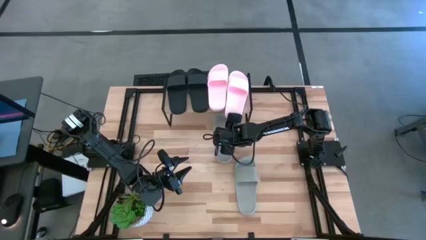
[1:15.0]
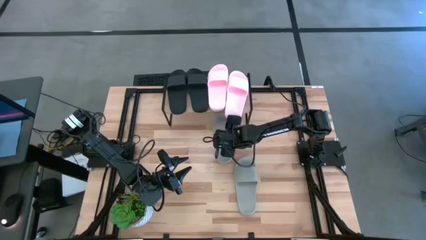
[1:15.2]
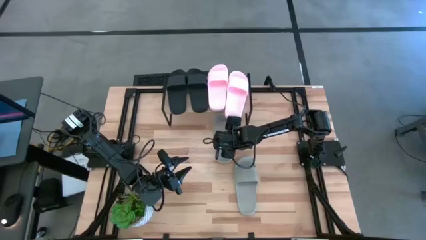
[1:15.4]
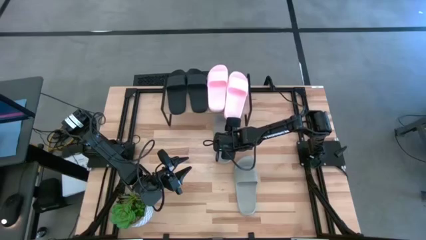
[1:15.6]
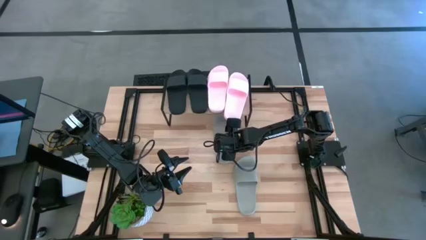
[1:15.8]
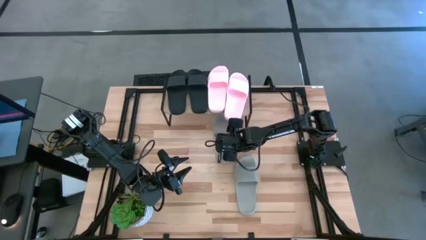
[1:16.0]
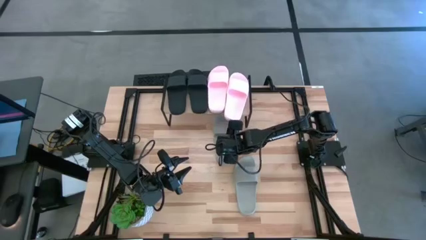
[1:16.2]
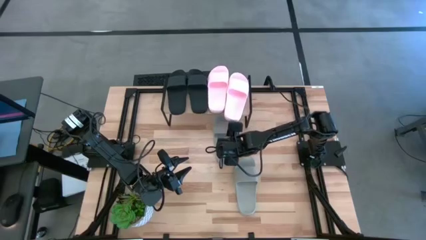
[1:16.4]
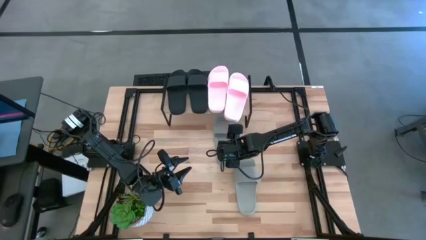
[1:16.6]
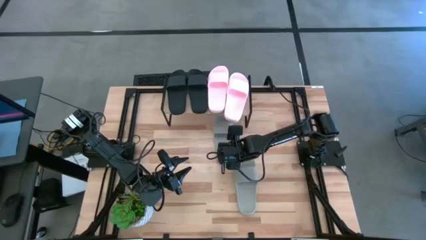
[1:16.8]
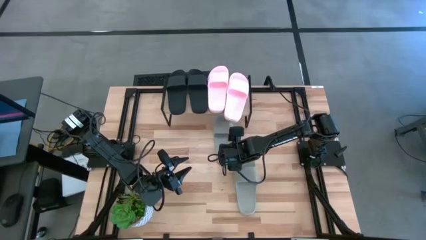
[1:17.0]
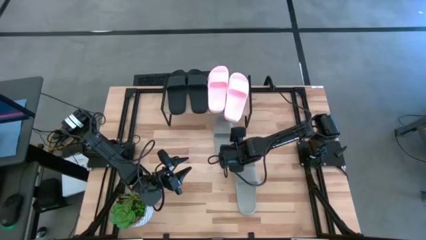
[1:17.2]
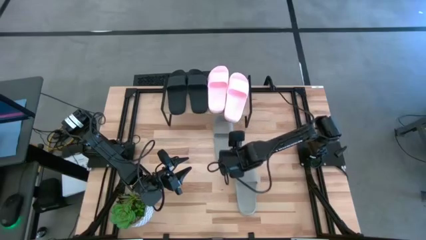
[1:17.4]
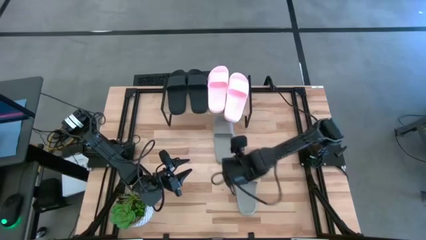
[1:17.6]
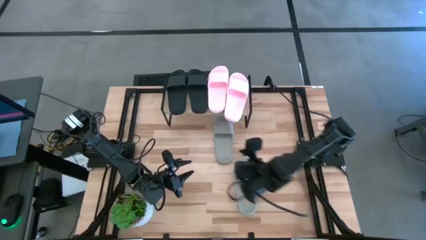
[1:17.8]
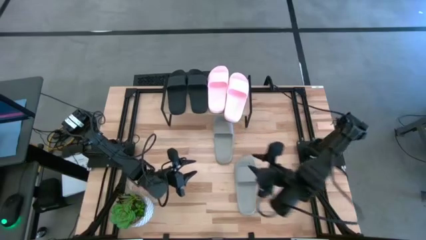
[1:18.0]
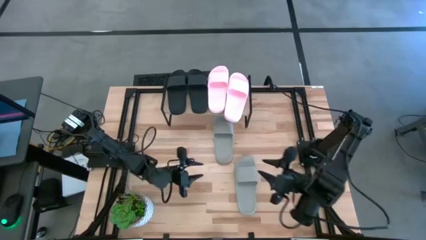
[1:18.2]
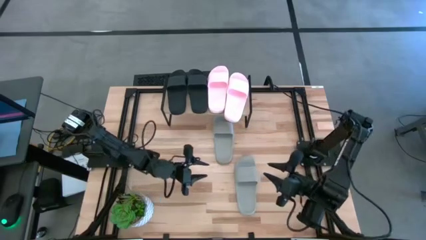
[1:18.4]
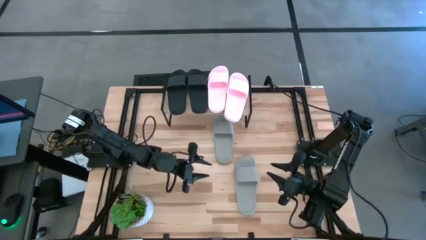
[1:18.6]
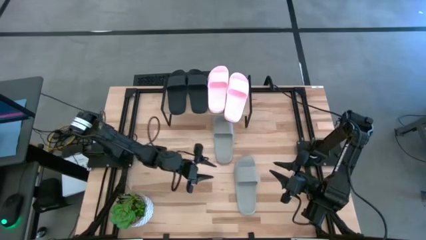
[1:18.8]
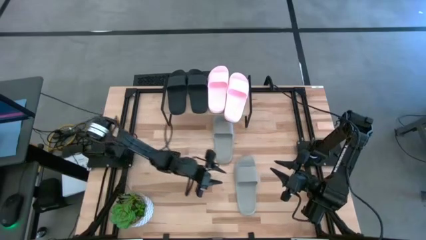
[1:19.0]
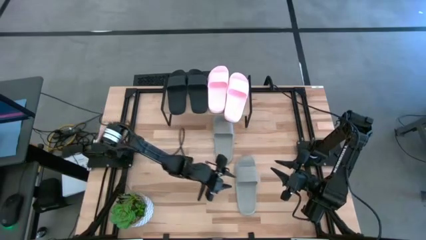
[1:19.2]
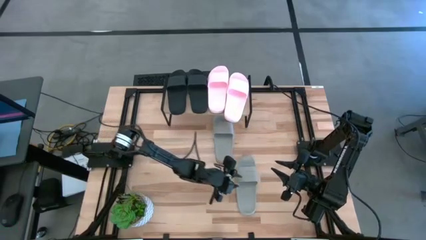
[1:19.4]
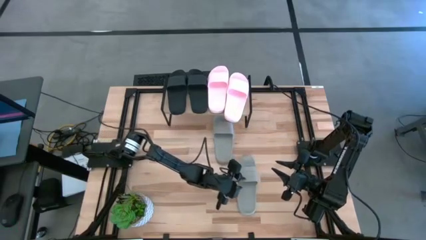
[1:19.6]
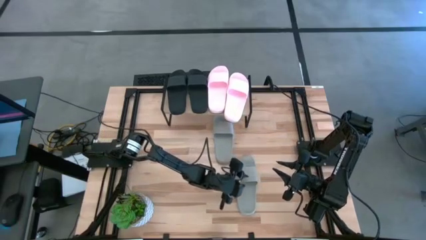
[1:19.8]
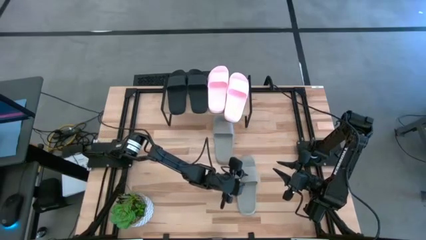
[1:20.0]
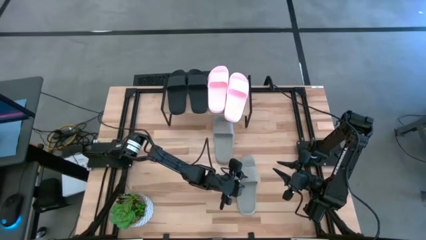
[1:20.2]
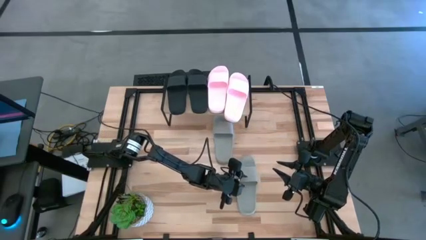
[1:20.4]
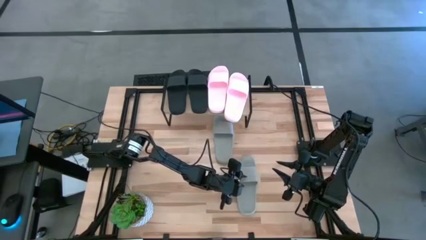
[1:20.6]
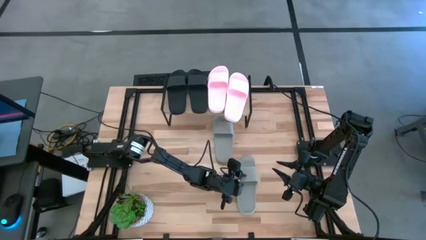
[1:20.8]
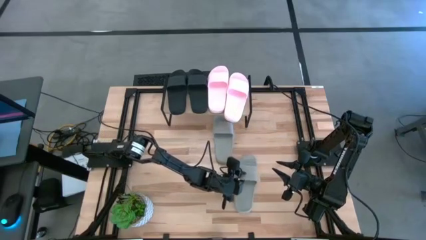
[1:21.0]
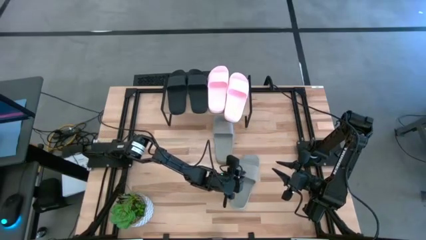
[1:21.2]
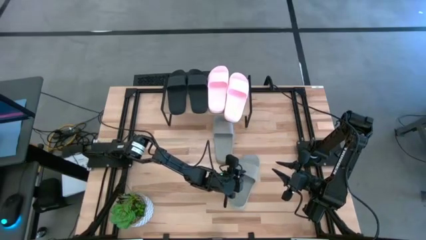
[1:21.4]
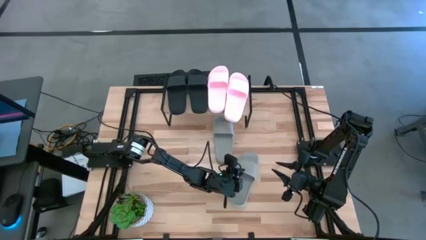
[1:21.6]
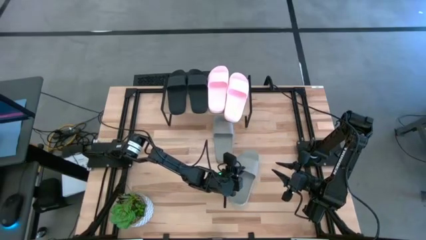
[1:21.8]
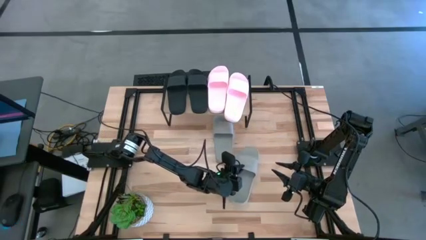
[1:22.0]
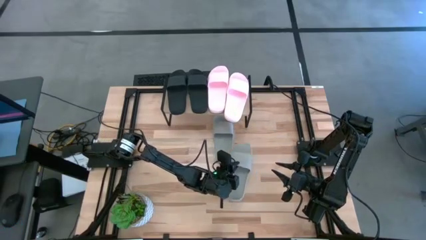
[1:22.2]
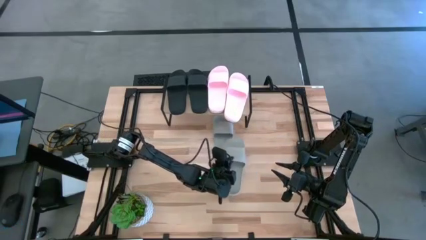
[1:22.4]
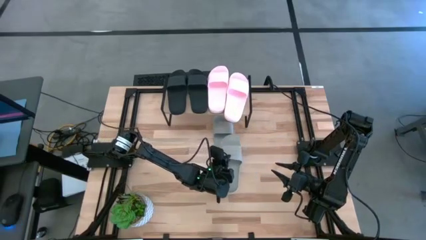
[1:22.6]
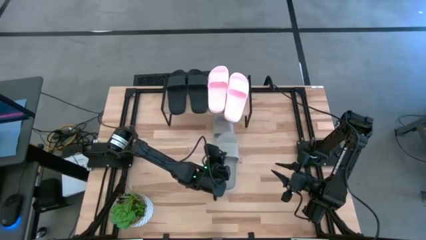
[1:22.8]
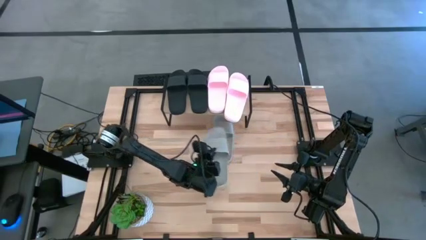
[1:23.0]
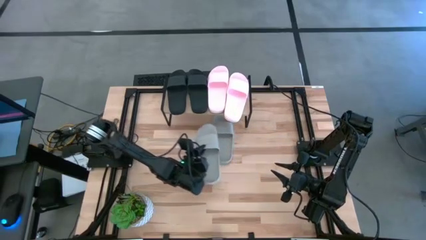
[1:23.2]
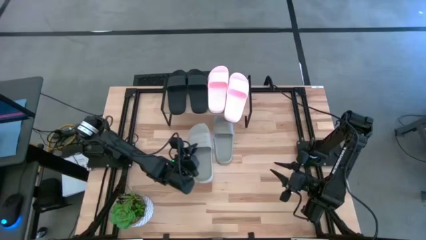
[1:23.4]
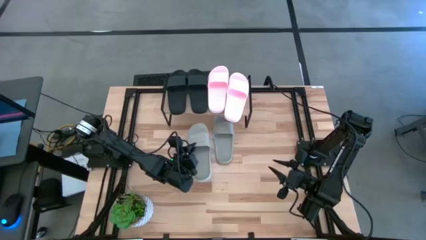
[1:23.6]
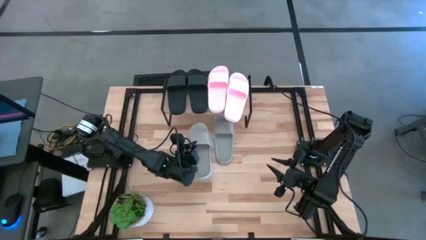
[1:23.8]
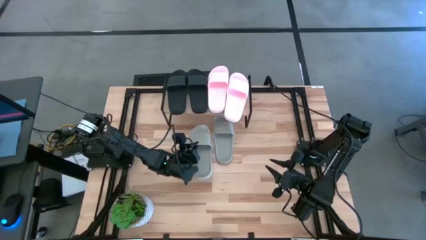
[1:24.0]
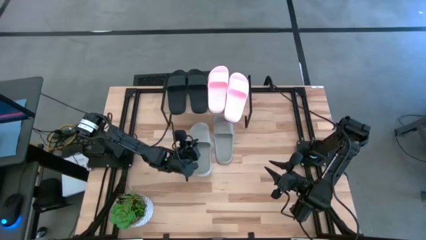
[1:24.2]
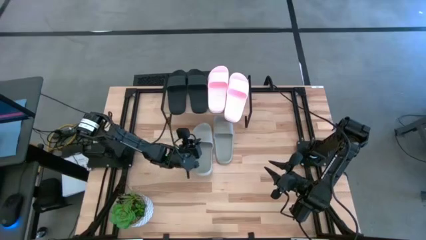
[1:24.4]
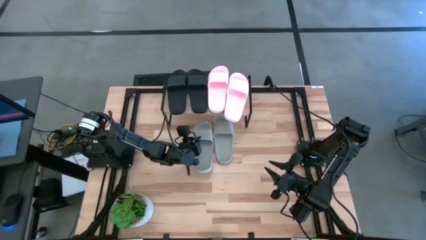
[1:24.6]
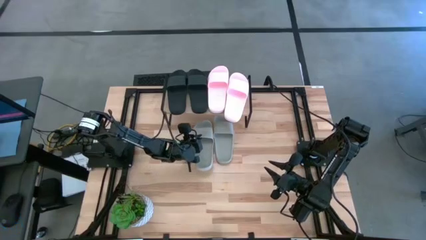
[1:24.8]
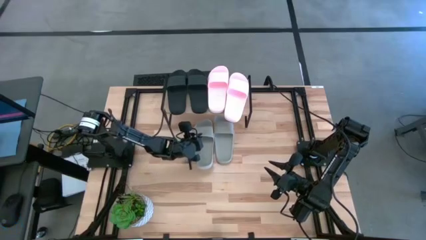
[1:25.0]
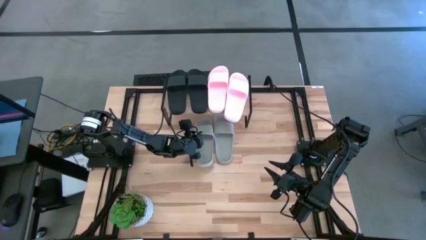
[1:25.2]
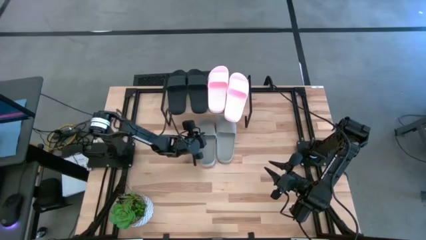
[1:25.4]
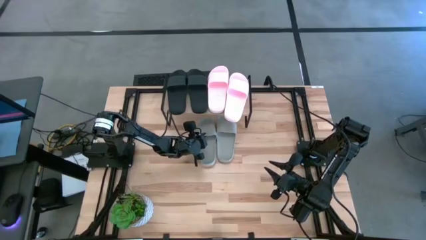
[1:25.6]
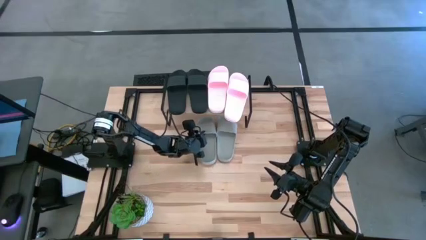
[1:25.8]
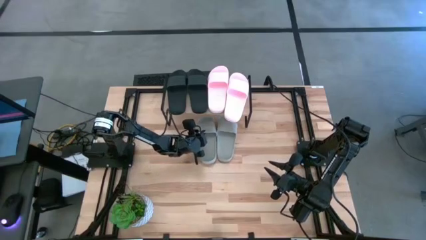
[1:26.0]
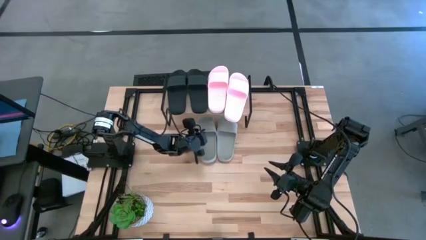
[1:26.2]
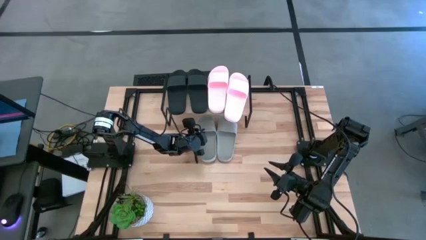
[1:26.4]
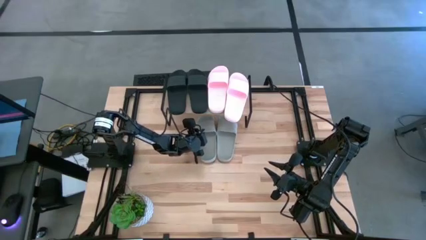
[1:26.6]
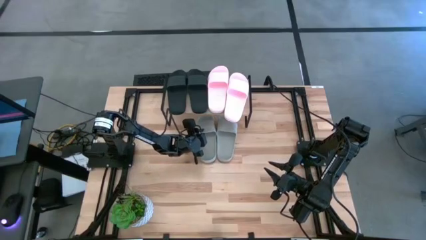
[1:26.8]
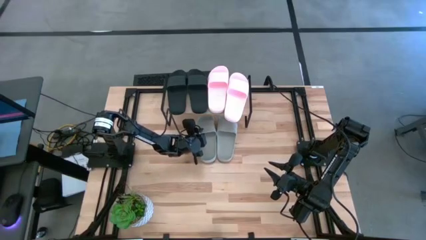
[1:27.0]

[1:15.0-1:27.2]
Task: Pick and place slides into the shelf
Put the gray slide under the shelf

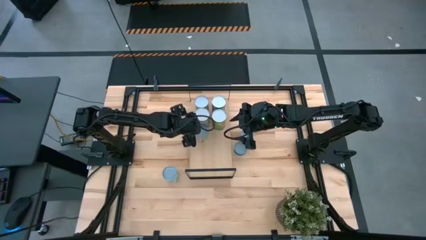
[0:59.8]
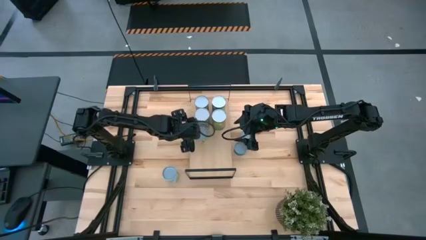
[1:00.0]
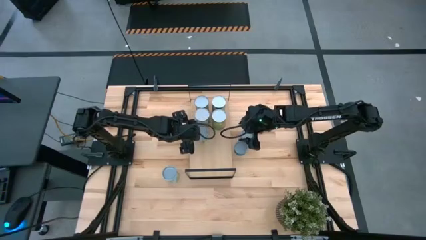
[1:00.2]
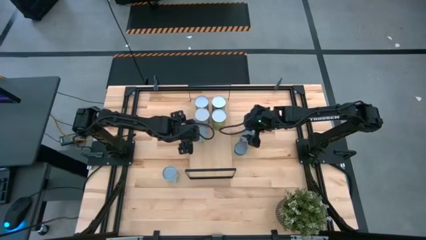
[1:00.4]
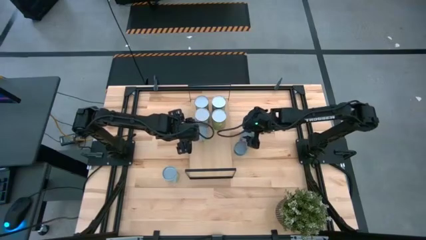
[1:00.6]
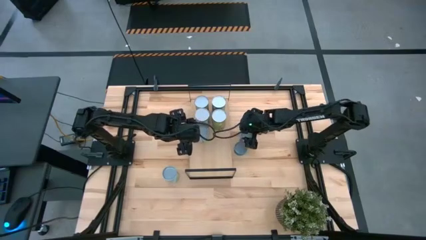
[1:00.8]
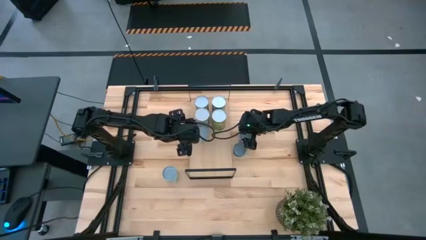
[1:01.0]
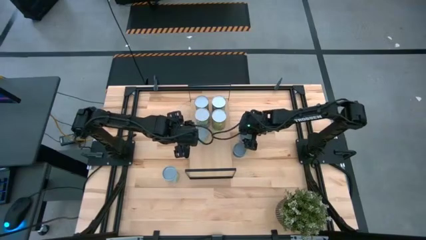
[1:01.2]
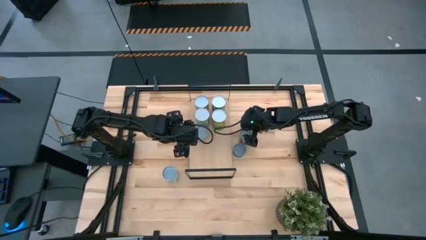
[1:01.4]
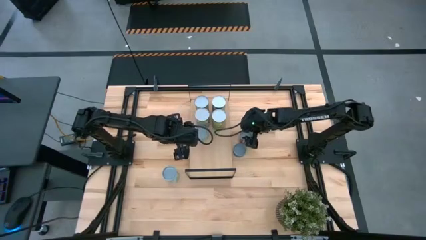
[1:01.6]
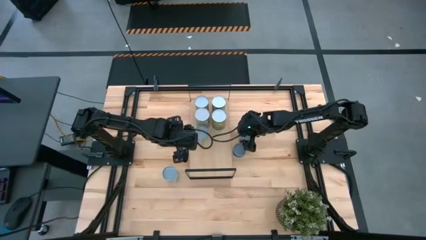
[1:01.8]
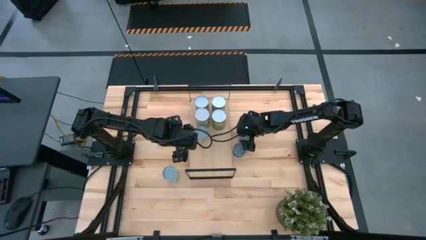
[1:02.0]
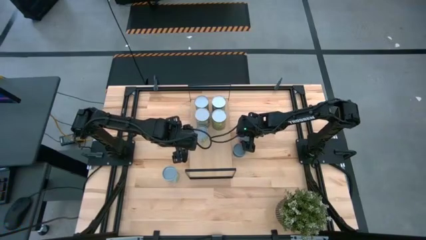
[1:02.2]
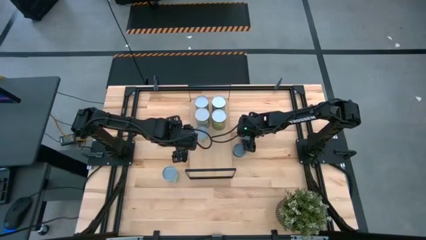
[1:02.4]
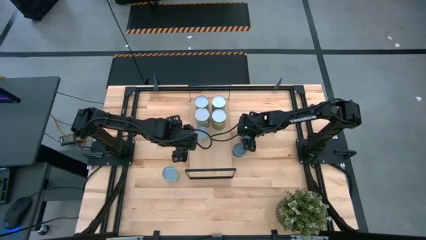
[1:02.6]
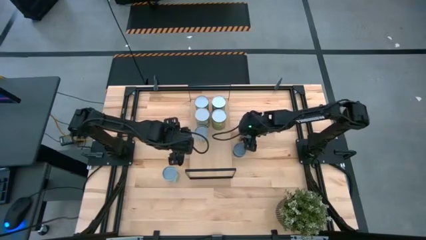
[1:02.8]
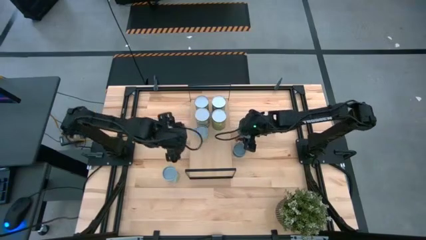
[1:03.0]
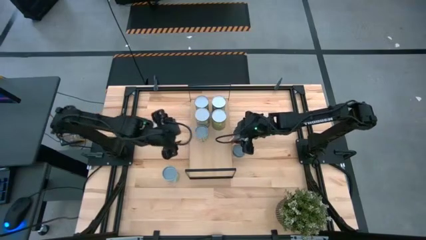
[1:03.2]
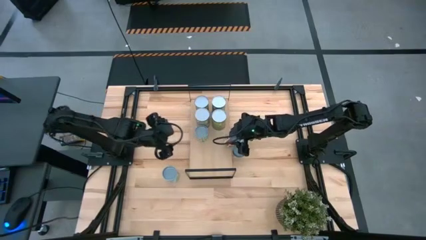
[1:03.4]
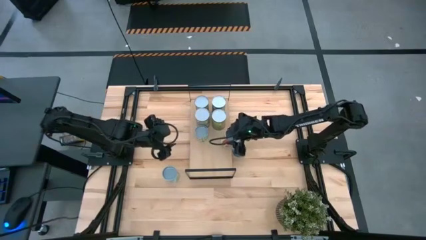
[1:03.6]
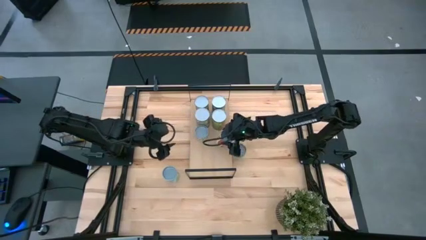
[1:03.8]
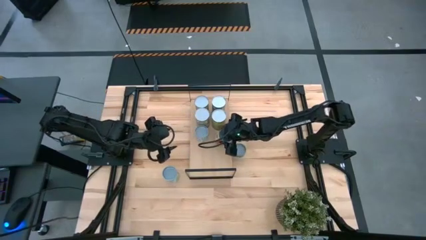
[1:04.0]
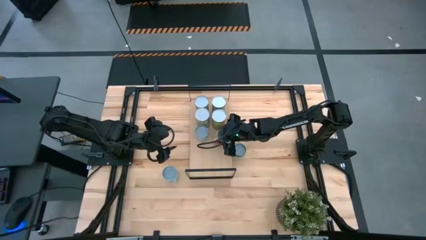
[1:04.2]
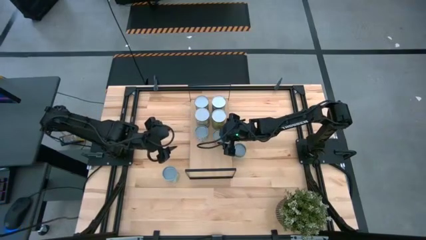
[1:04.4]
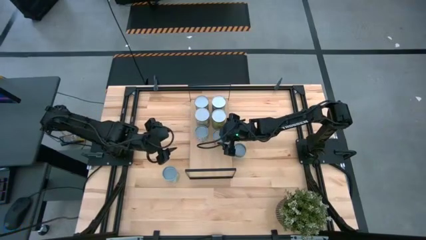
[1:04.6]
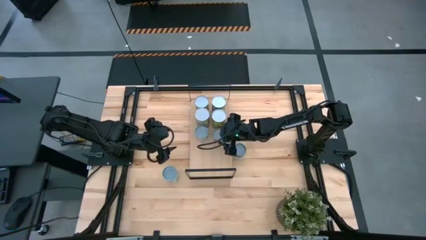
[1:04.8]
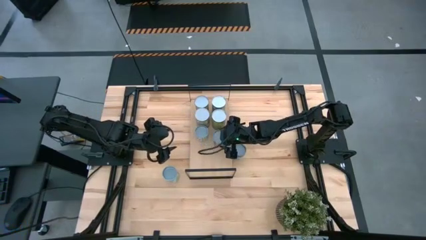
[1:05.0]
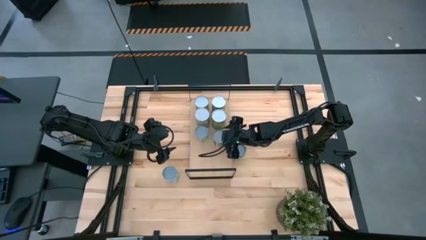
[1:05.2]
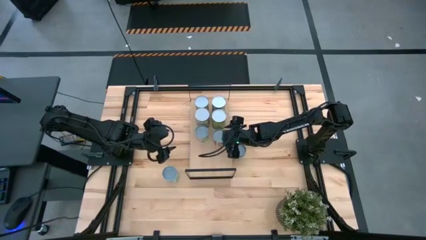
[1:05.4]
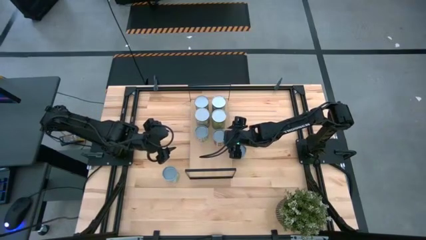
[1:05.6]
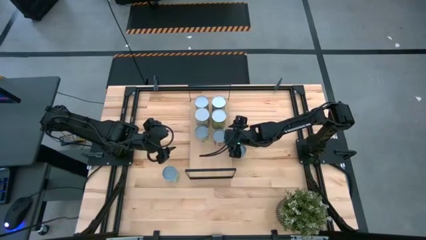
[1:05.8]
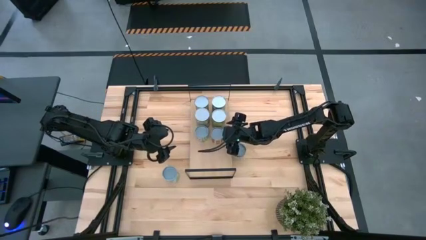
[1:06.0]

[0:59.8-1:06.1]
Task: Pick and place cans onto a shelf
Put the canned tomato onto the shelf
